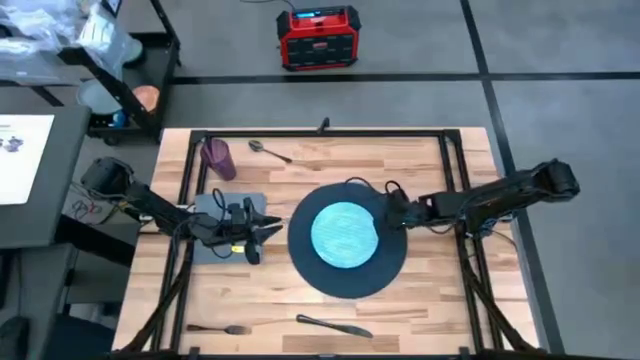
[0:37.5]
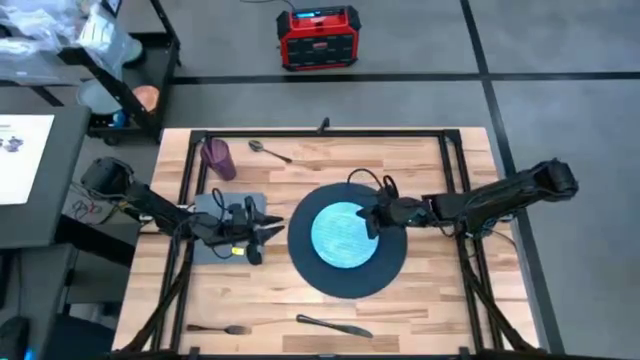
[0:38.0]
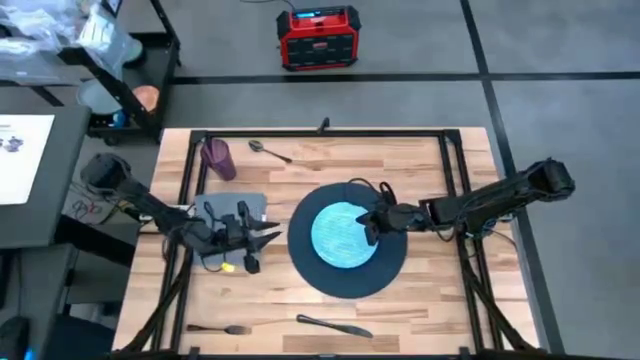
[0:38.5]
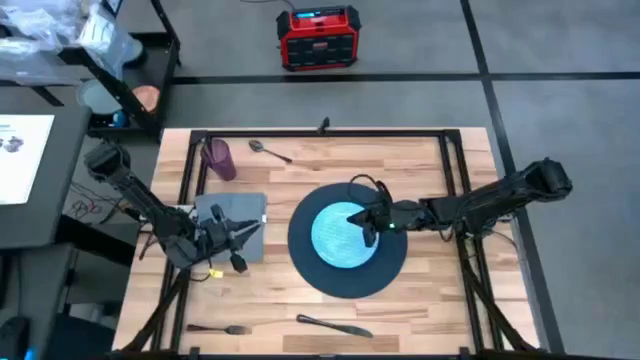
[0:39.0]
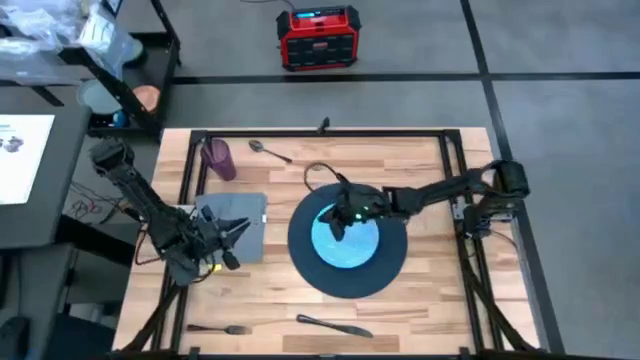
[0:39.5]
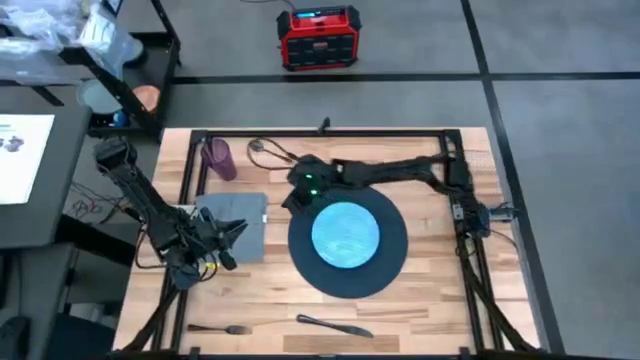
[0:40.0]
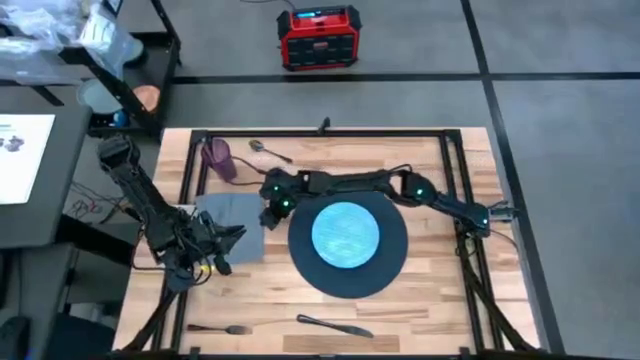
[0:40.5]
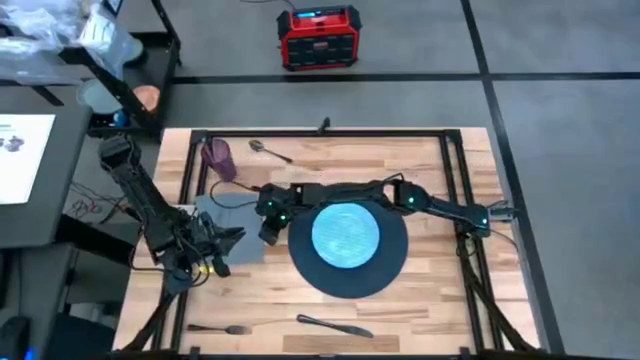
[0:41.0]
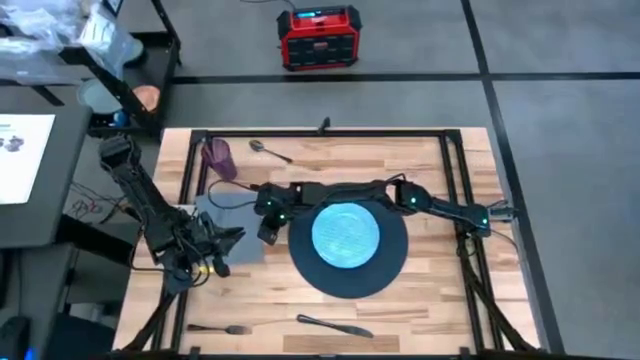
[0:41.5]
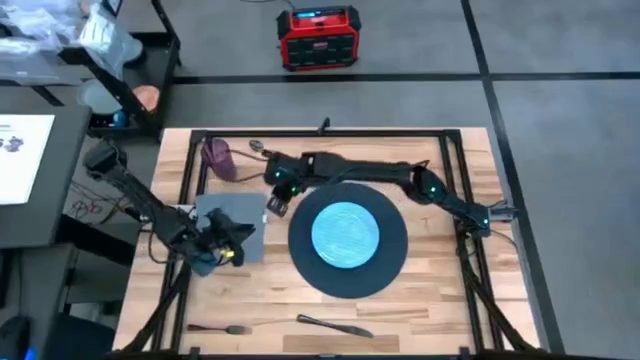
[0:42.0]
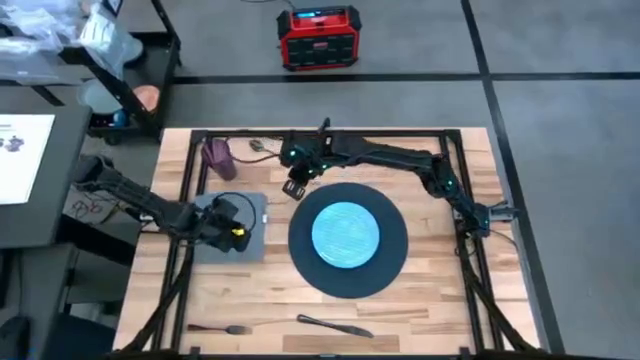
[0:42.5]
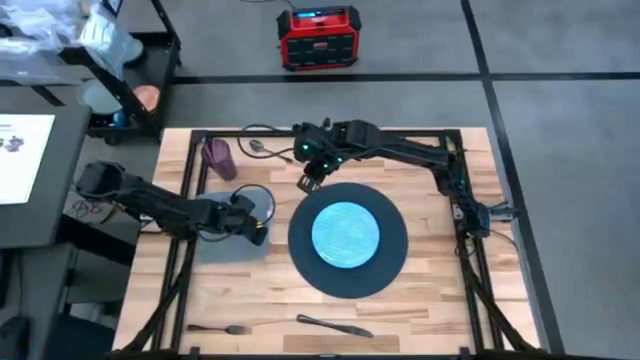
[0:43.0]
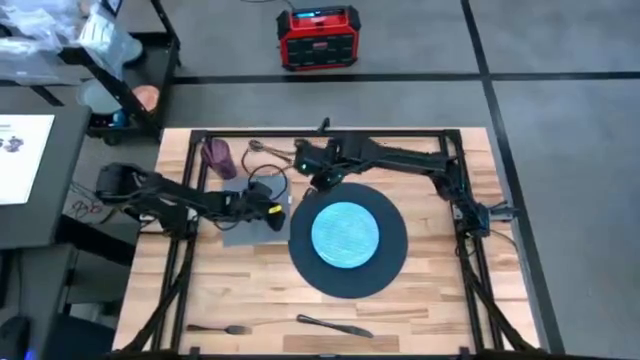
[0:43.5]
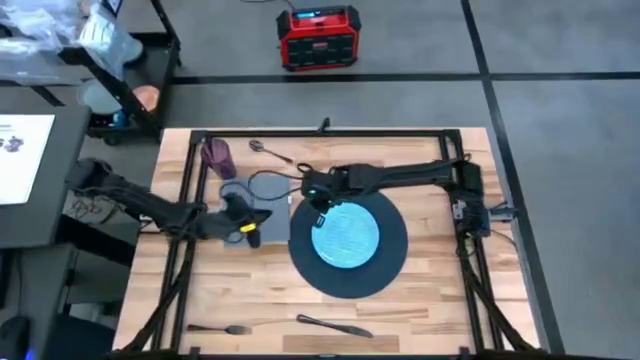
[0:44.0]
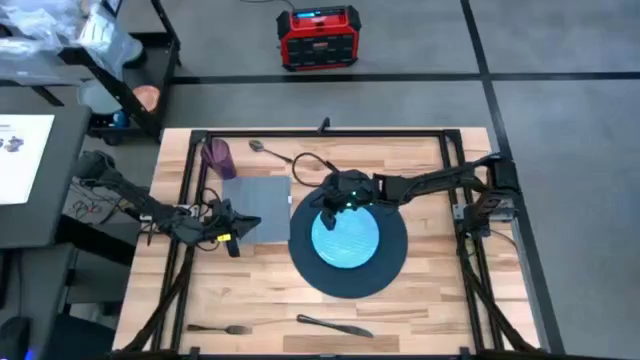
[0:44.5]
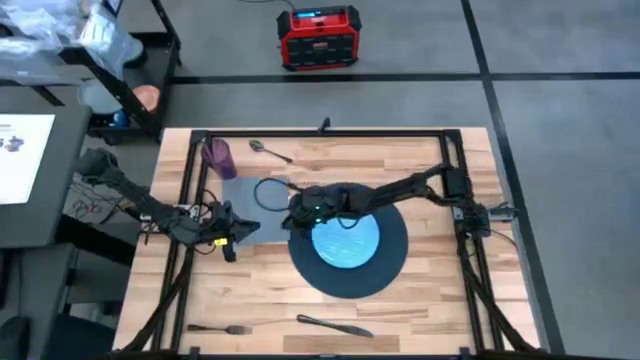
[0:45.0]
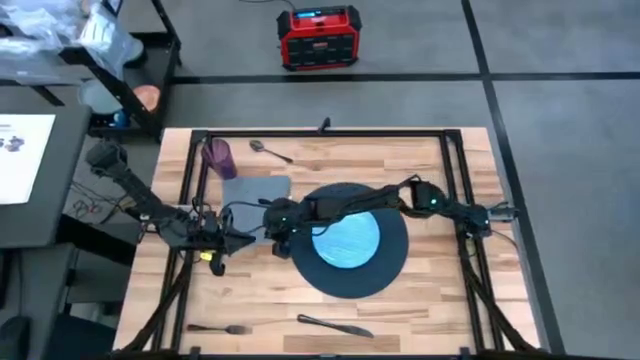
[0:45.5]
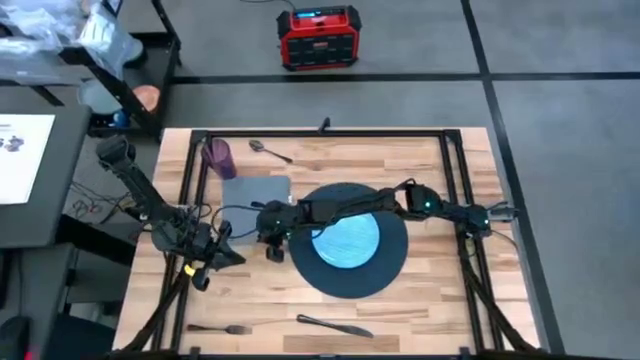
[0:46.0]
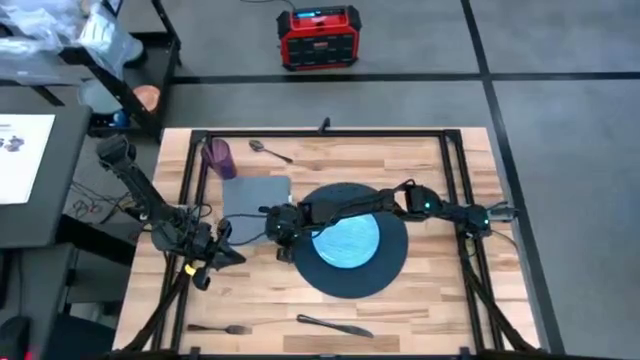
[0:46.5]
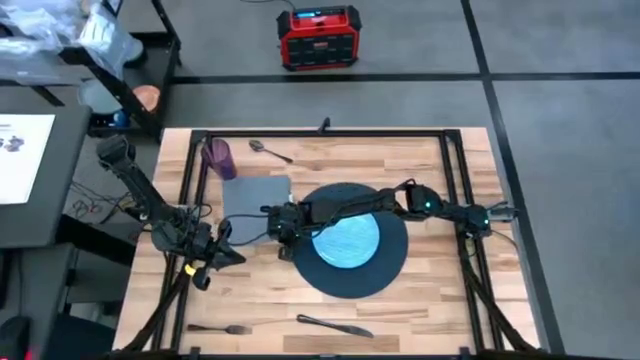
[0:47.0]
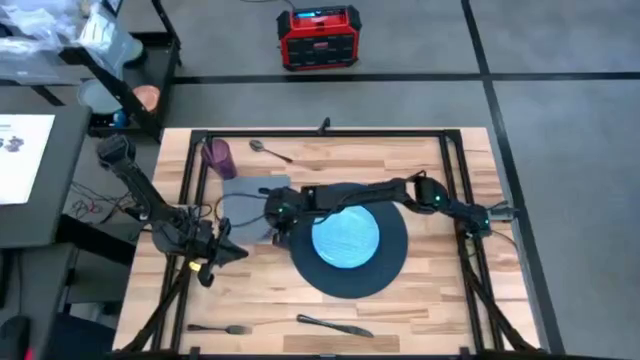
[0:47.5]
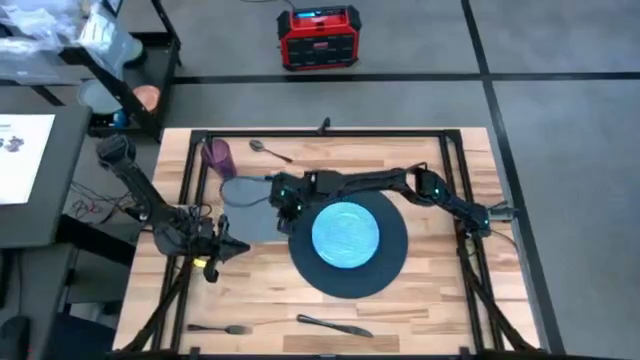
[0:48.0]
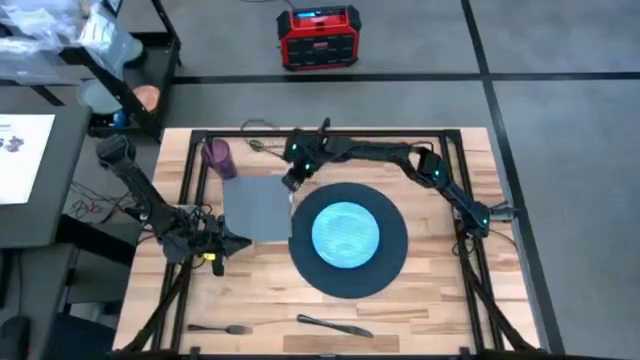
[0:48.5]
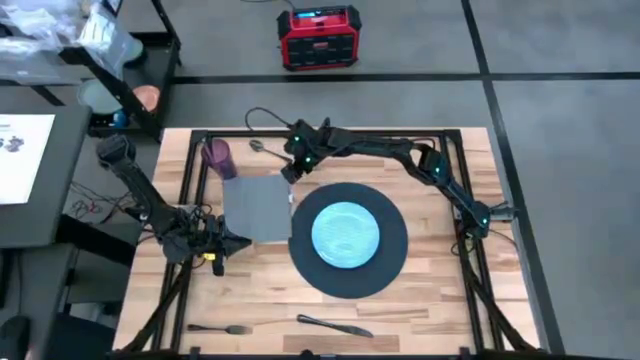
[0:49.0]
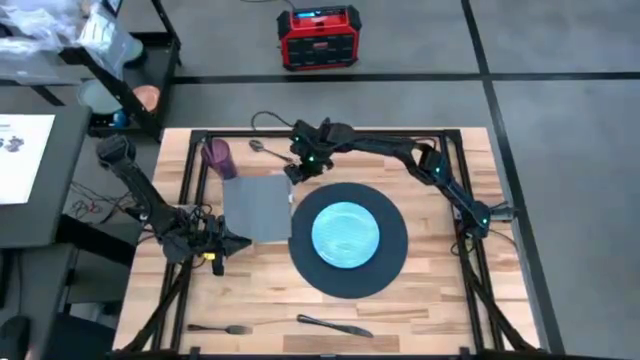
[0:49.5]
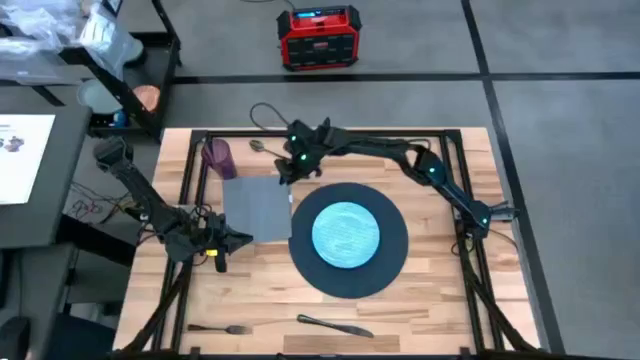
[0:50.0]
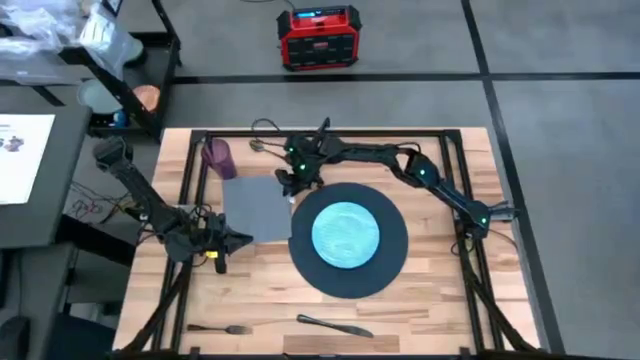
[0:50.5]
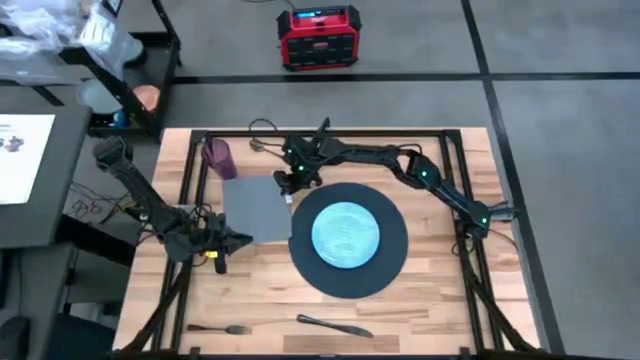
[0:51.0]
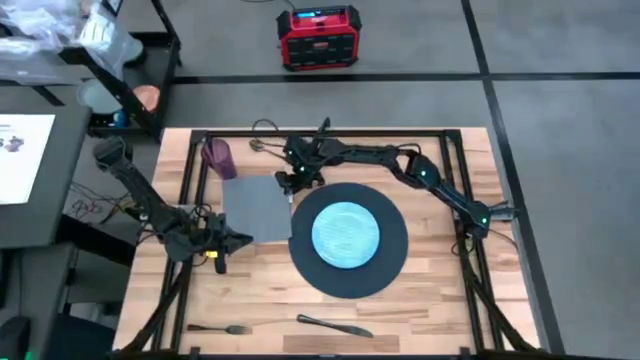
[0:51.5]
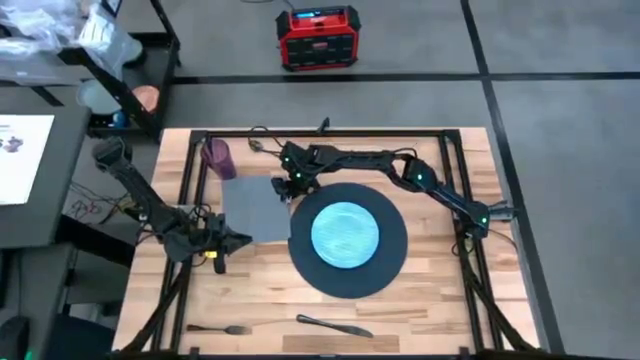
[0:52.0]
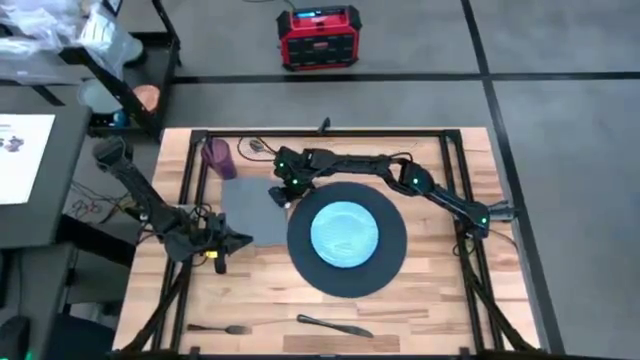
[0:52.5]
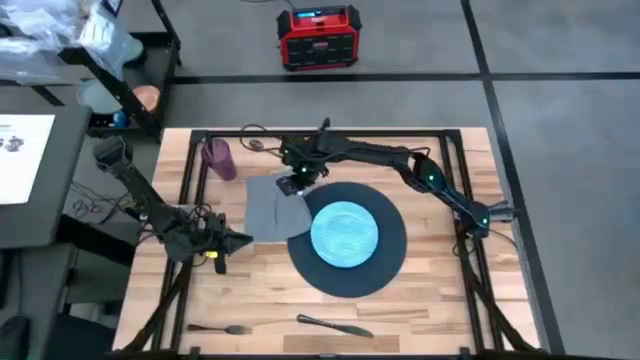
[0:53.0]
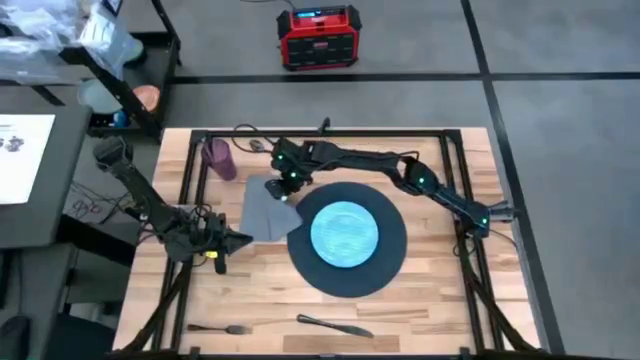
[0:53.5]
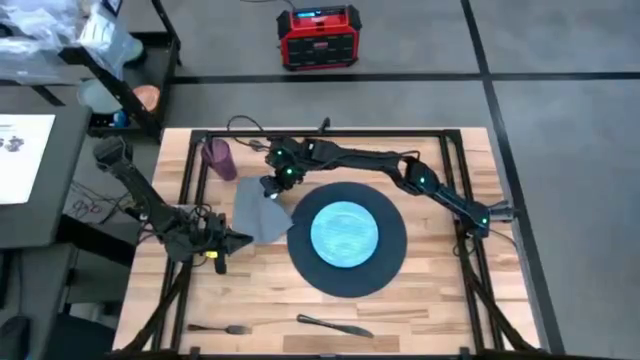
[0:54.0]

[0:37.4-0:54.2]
Task: Set table place
Fold the gray napkin

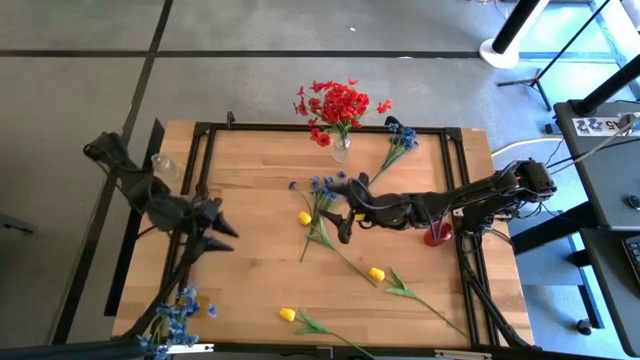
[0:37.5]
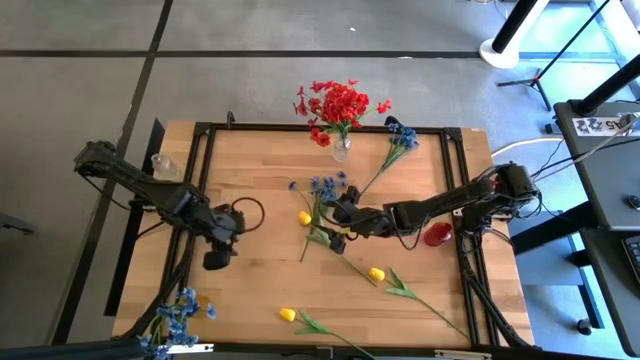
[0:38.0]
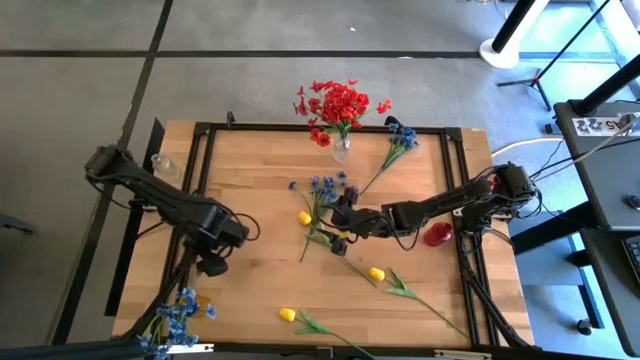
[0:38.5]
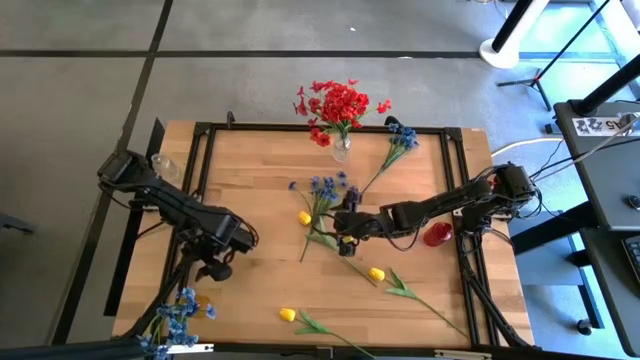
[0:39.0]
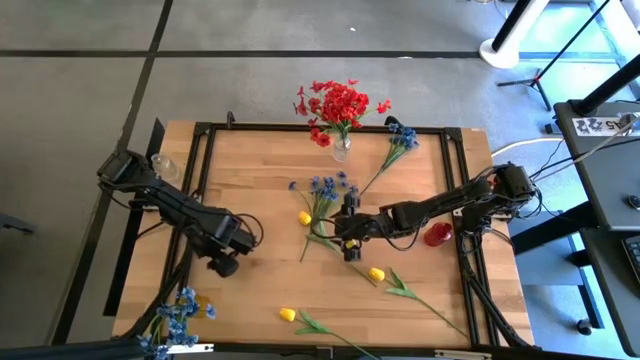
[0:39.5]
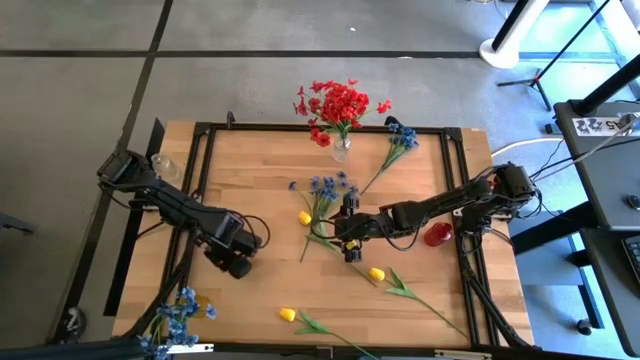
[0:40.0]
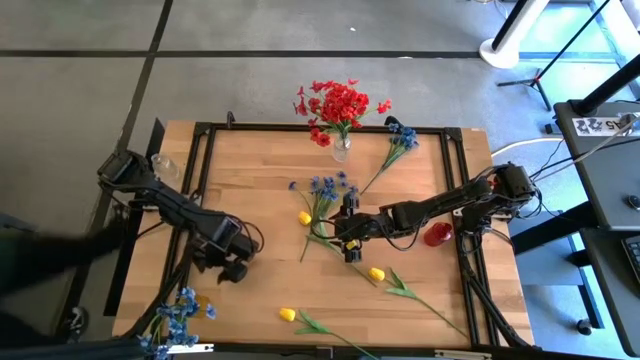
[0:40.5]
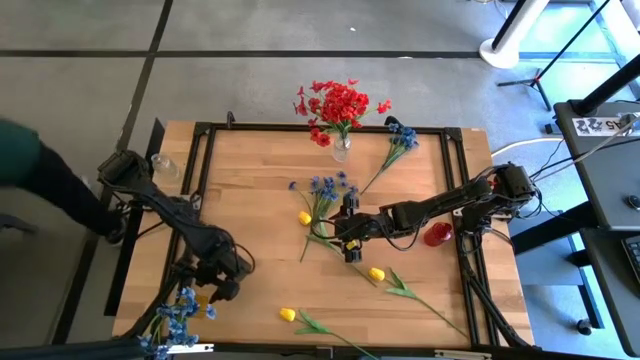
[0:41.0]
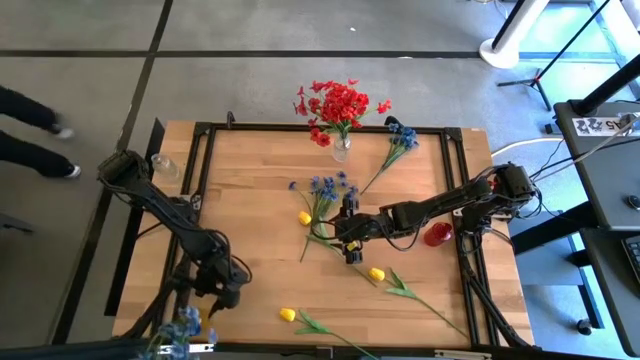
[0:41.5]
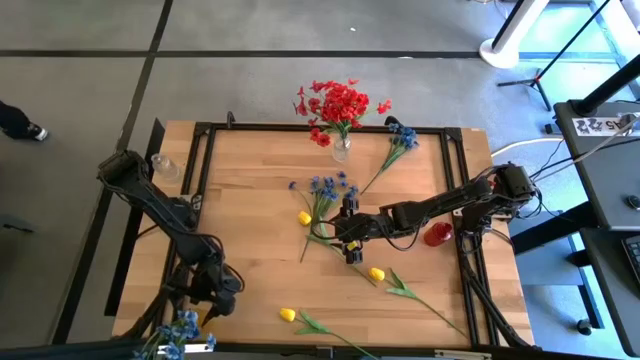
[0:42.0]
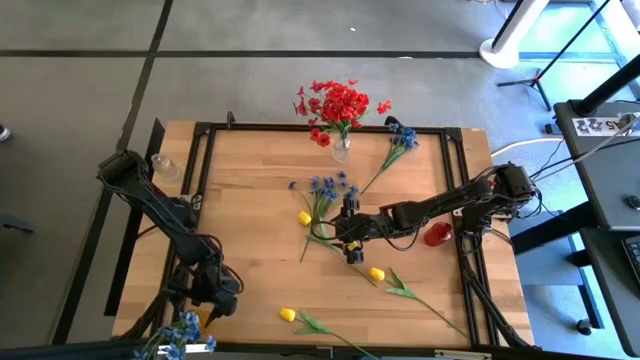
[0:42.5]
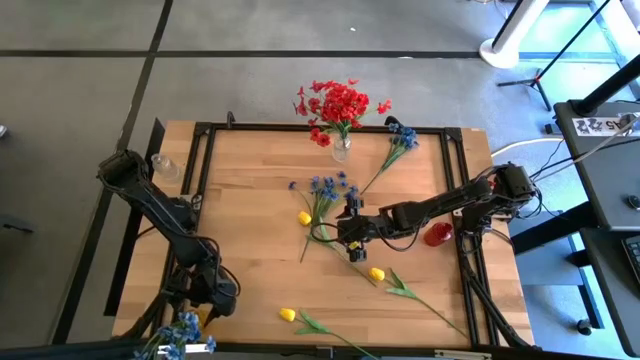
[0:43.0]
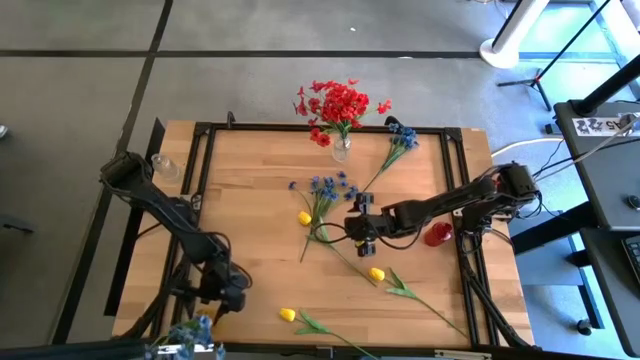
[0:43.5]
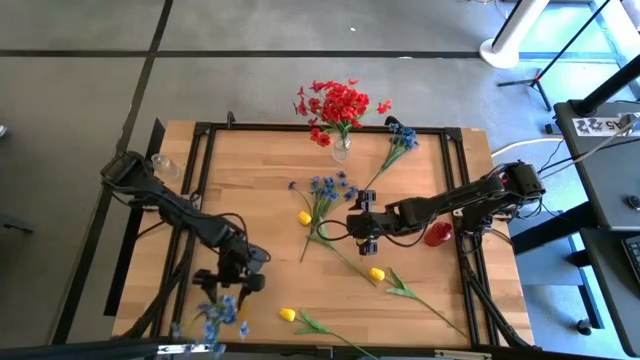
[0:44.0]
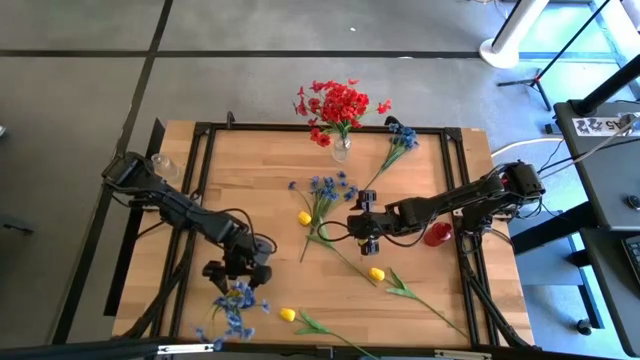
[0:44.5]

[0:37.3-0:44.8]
Task: Sort flowers into vase by color
Adjust the yellow vase
